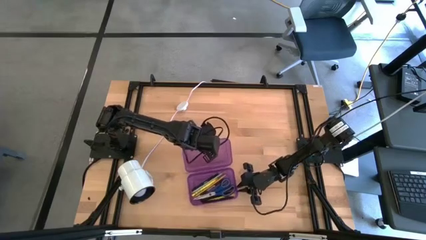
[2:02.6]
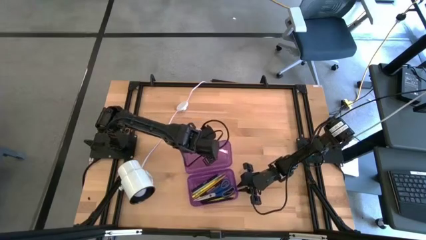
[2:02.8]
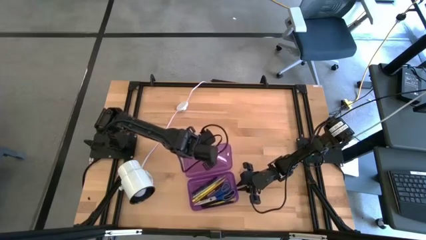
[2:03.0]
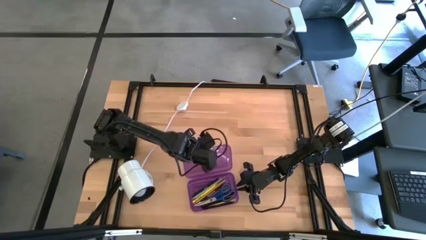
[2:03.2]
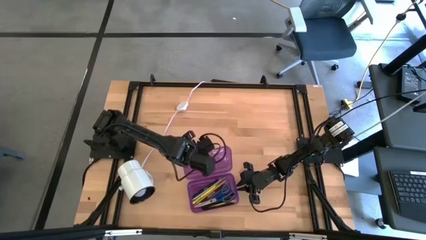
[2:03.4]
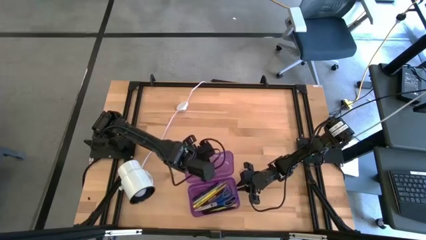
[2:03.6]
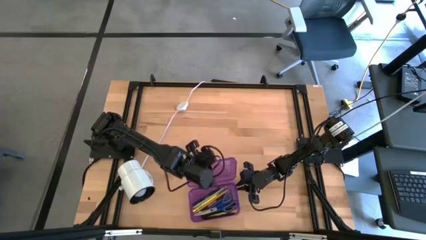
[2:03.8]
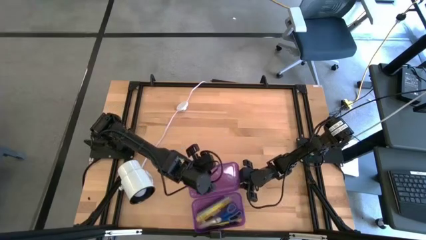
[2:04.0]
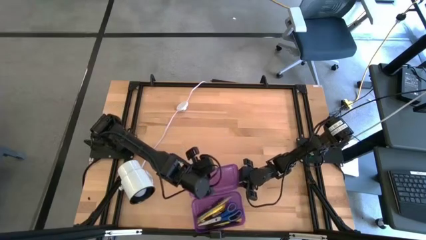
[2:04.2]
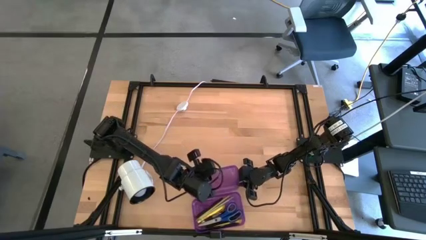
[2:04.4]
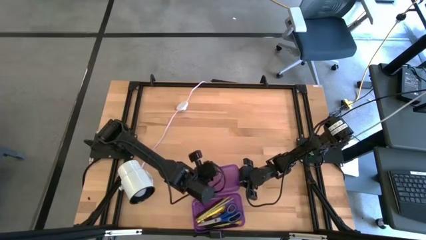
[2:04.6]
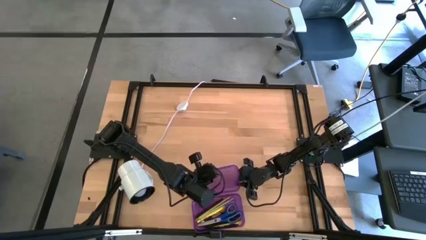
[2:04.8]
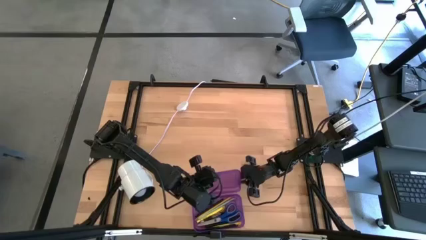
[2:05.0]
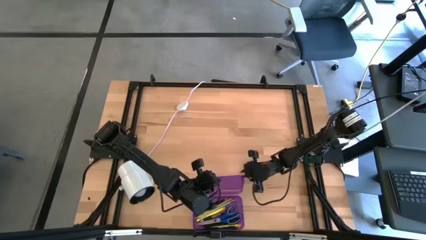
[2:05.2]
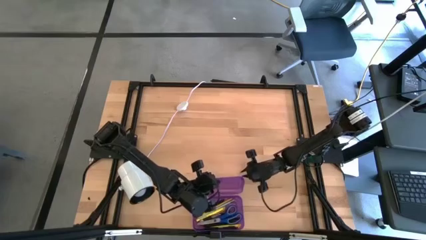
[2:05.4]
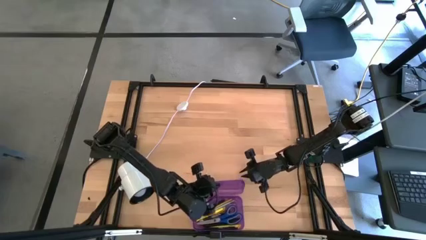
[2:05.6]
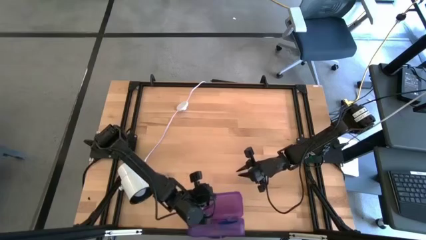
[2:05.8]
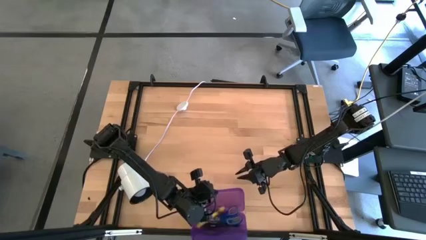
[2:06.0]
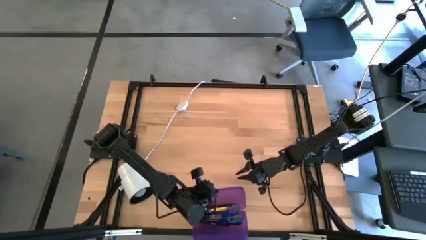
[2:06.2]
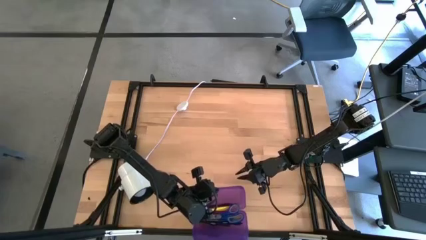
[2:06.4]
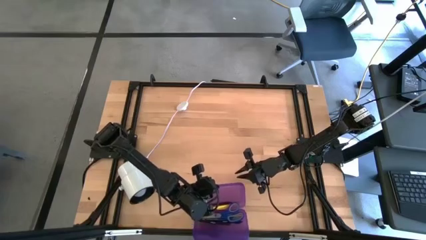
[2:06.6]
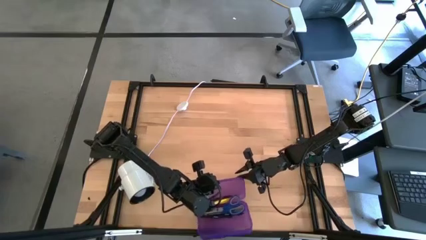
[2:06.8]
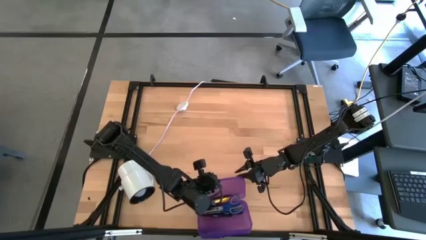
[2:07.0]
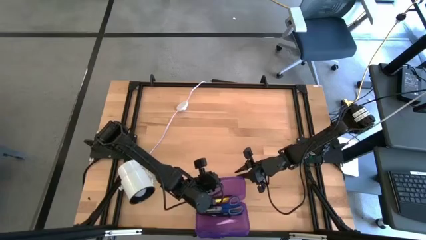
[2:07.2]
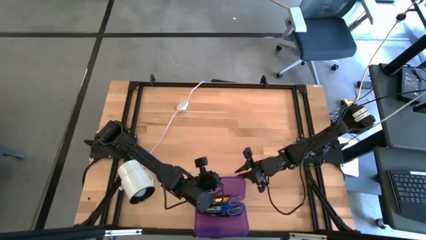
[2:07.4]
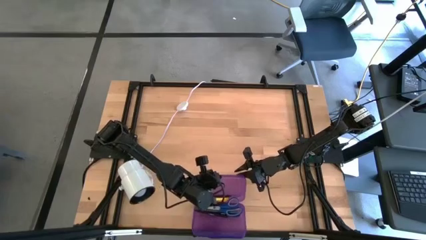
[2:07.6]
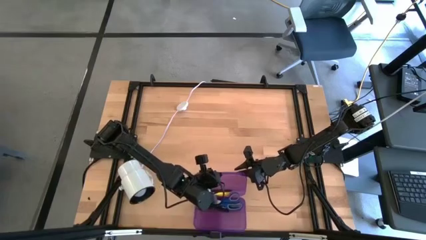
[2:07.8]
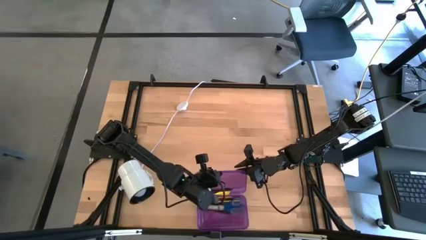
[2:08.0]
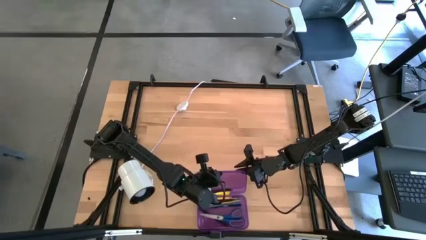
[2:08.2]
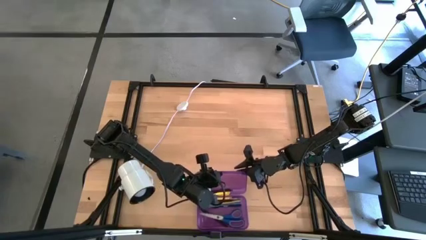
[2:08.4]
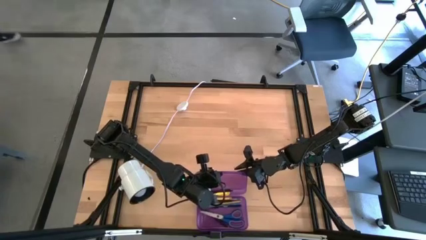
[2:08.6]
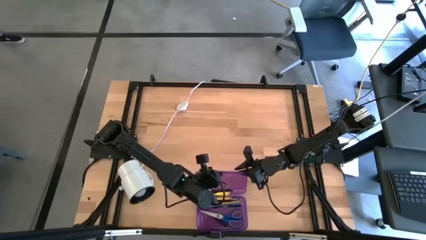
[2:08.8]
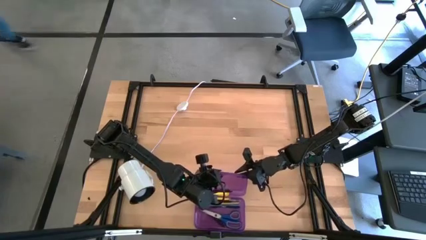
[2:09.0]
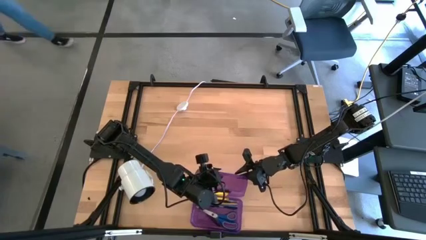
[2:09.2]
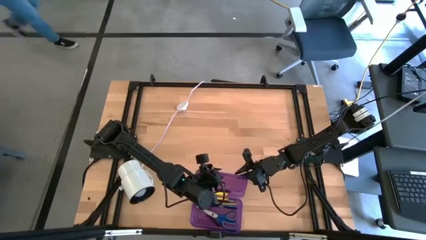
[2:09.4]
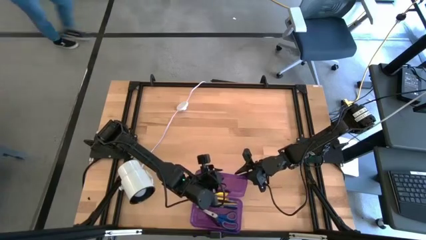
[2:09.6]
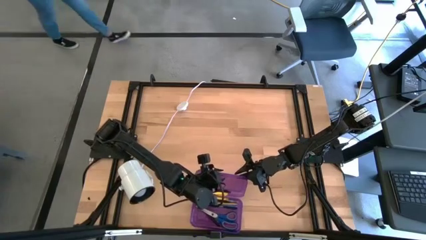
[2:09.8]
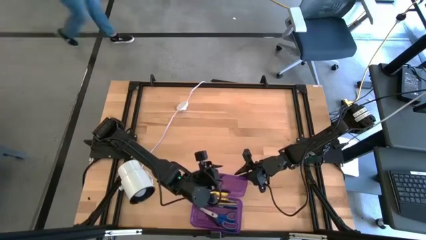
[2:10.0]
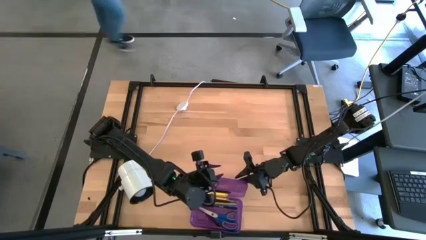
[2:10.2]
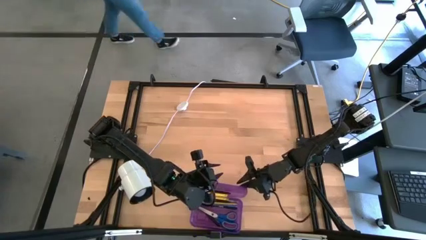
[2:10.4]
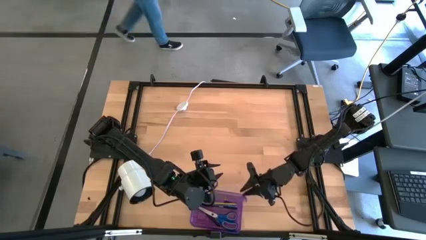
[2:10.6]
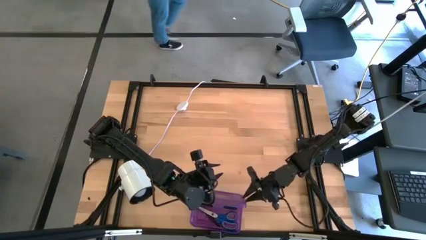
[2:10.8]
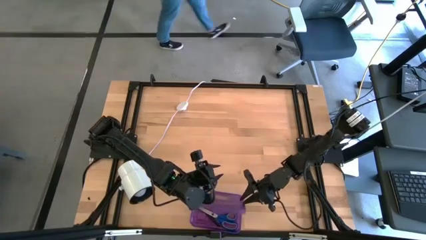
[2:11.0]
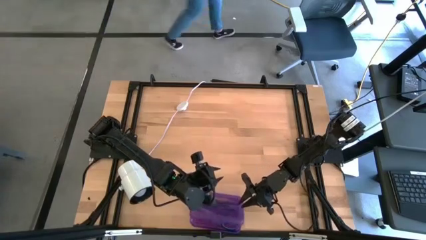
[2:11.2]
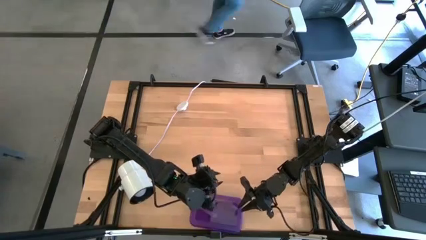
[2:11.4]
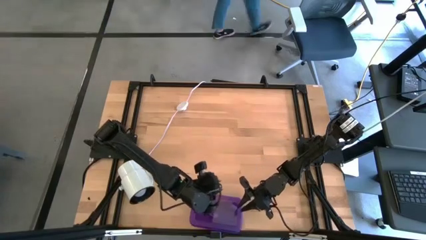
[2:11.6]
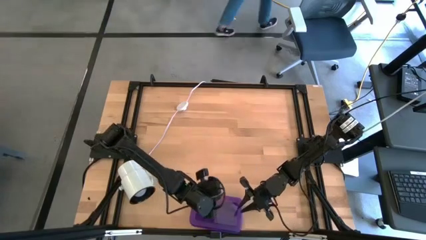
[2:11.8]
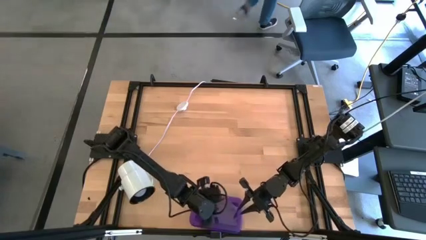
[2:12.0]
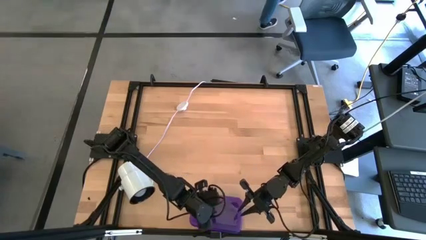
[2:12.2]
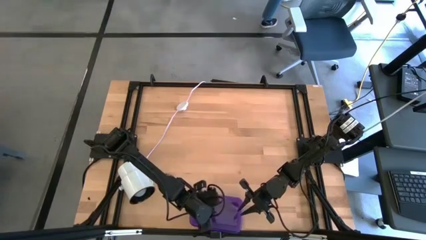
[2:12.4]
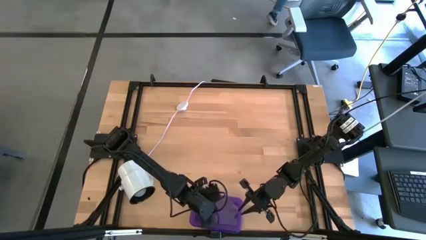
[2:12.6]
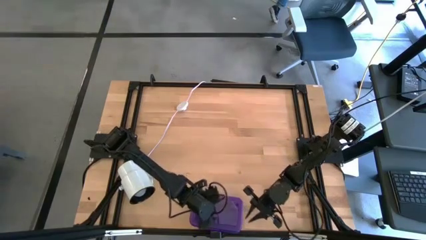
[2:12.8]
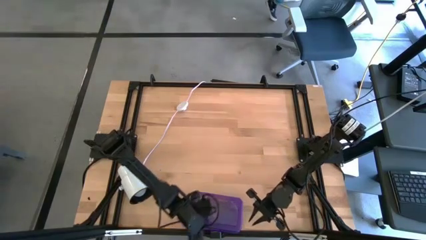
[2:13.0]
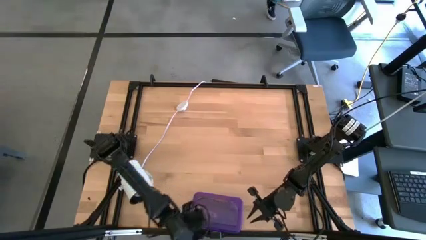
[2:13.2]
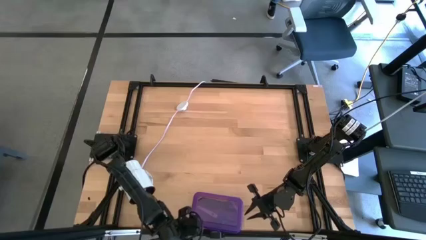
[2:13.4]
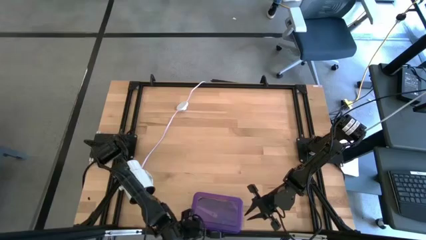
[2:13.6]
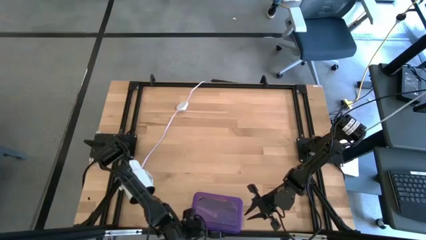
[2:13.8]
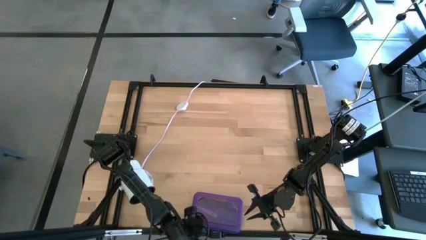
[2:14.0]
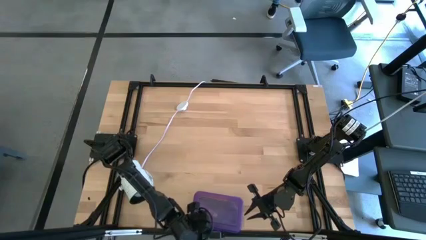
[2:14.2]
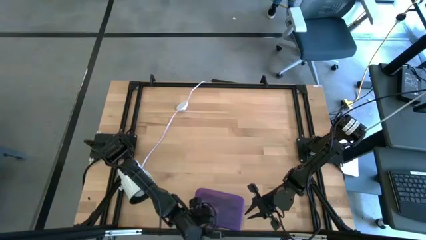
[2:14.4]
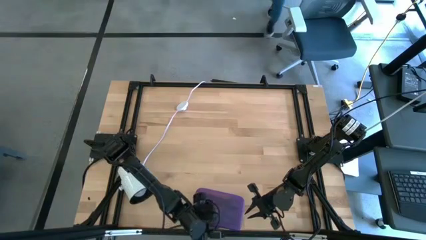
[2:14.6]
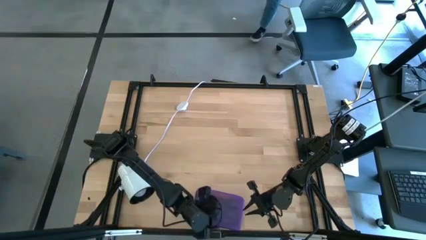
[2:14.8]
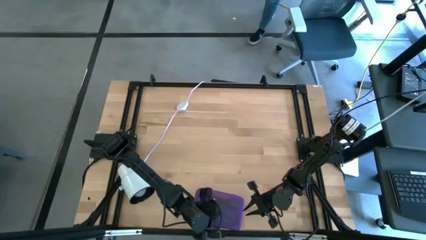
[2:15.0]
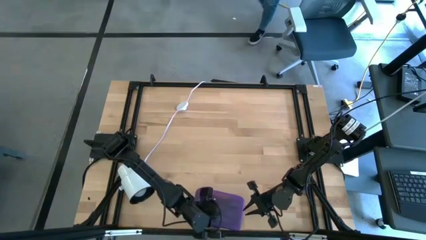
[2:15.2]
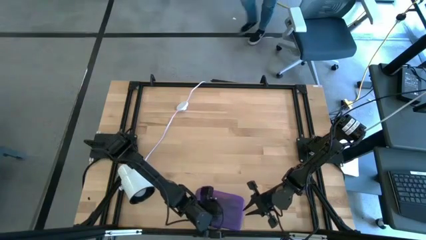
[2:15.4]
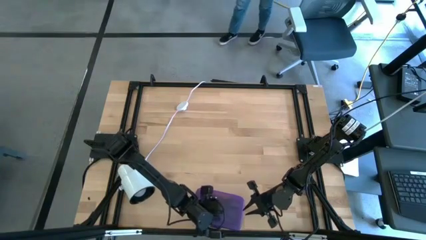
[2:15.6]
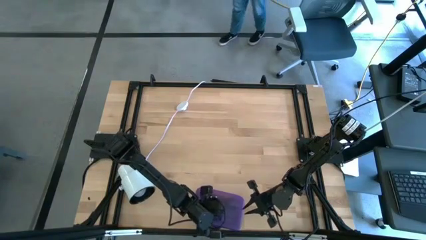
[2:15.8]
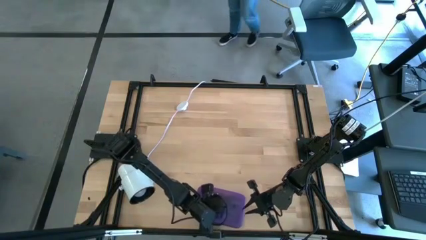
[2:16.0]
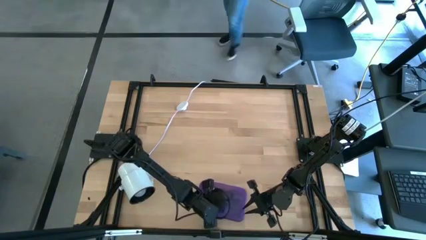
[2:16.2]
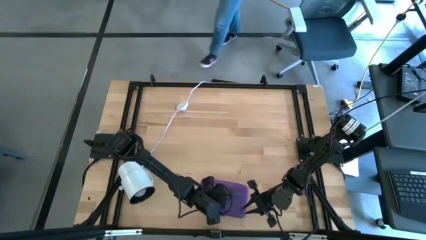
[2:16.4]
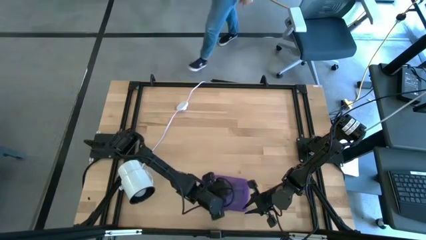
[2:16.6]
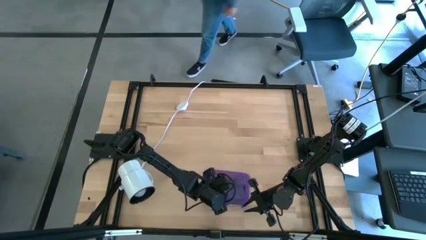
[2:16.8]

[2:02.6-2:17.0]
Task: Pick & place school supplies into a supply box
Close the purple supply box

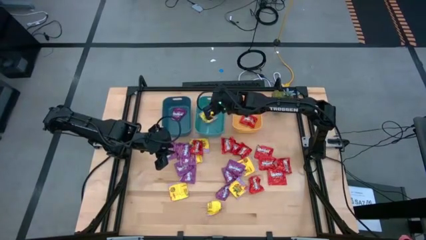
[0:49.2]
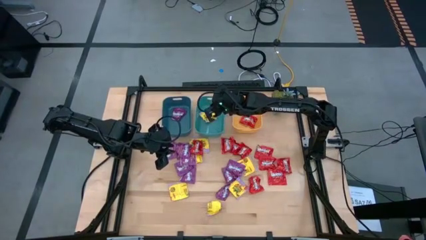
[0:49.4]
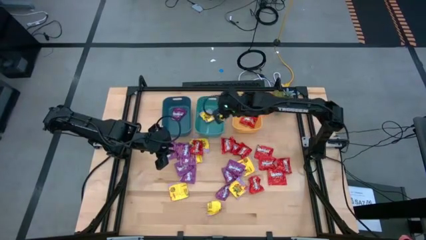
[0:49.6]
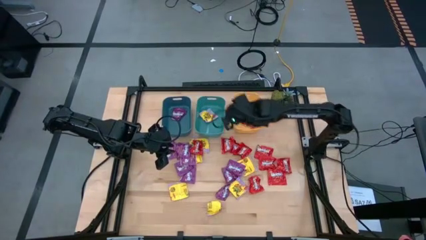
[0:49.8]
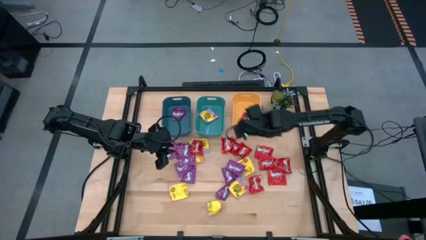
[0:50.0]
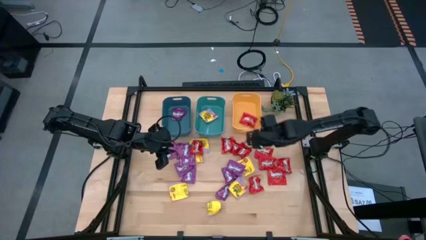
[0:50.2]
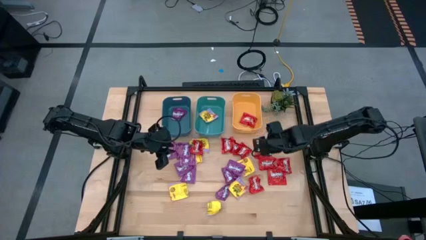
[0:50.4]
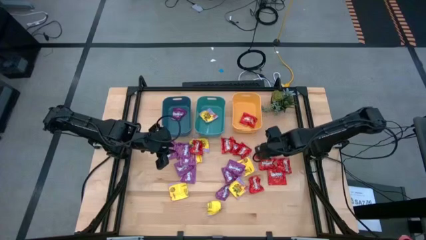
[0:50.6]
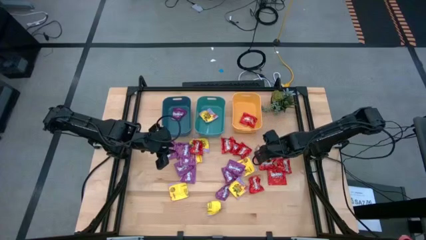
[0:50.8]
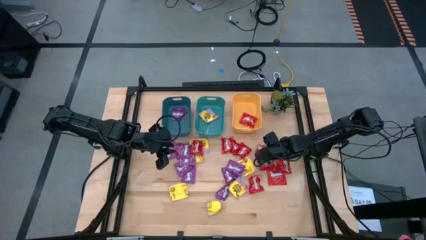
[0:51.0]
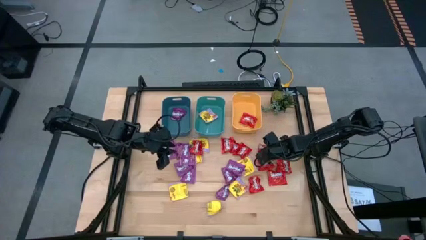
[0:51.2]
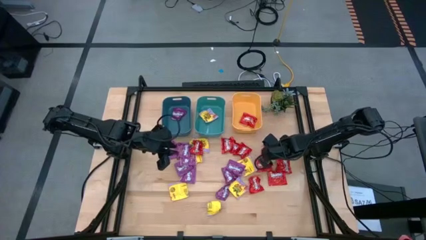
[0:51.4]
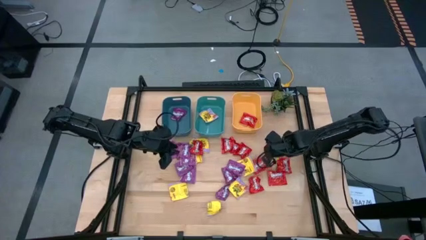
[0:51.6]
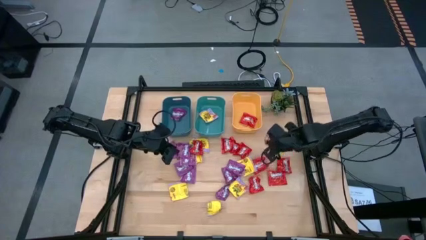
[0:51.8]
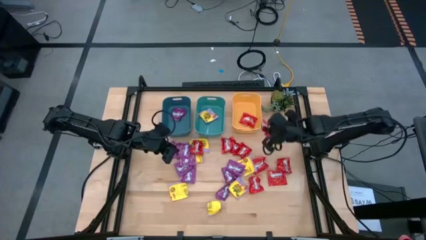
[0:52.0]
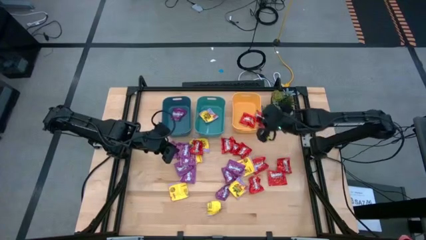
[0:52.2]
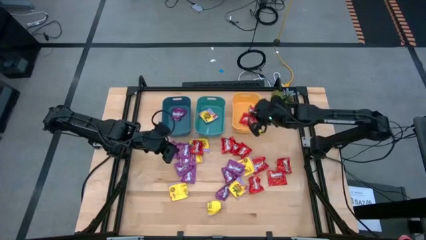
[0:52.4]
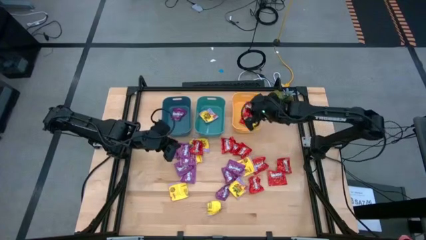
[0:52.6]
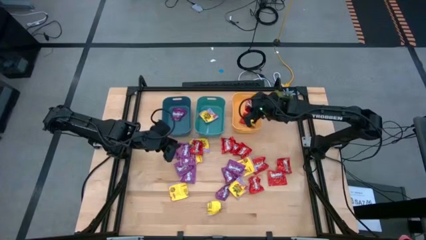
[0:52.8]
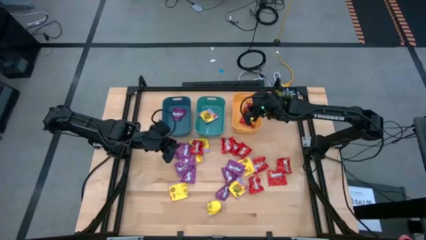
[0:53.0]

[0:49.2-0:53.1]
Task: Sort candy
Put the red candy into the yellow bin
